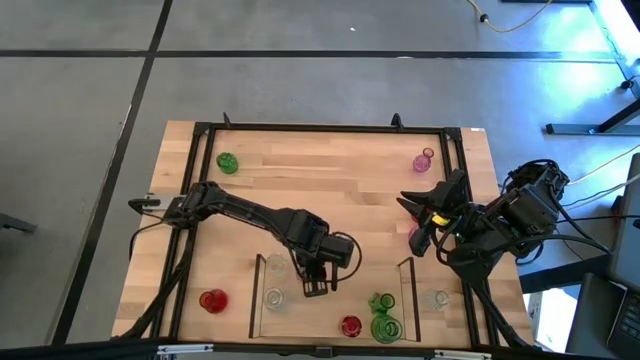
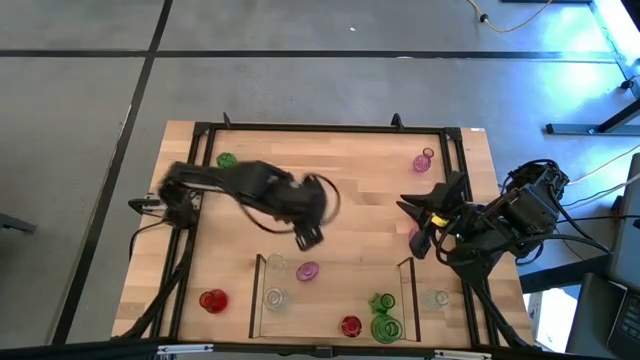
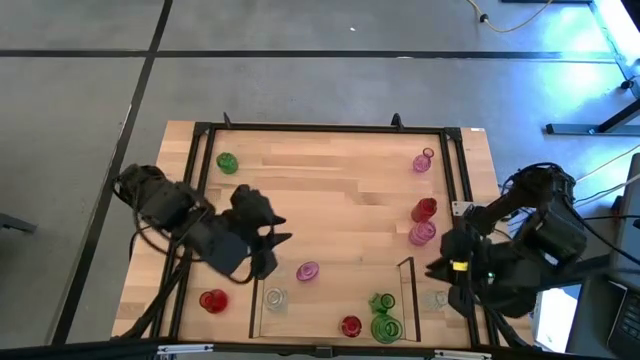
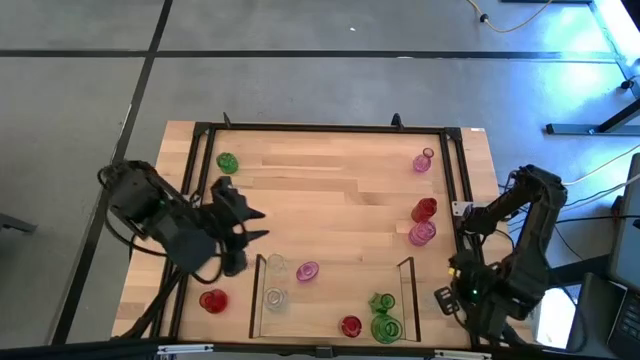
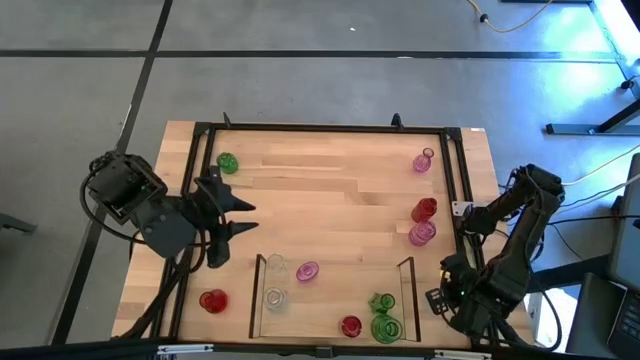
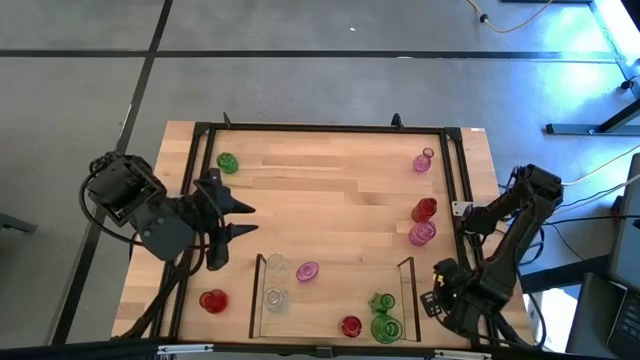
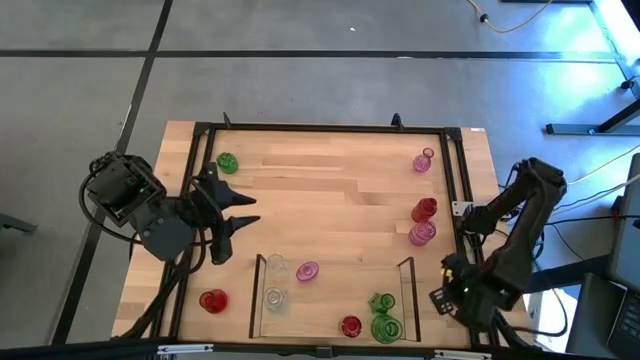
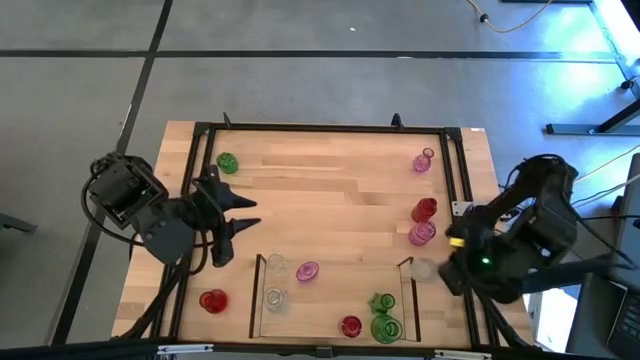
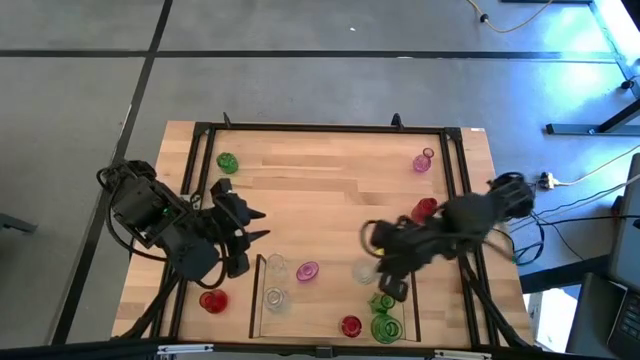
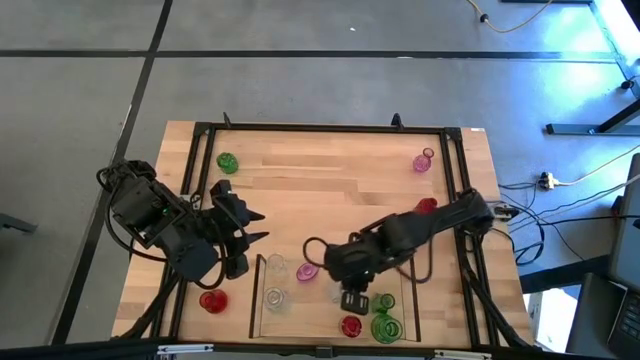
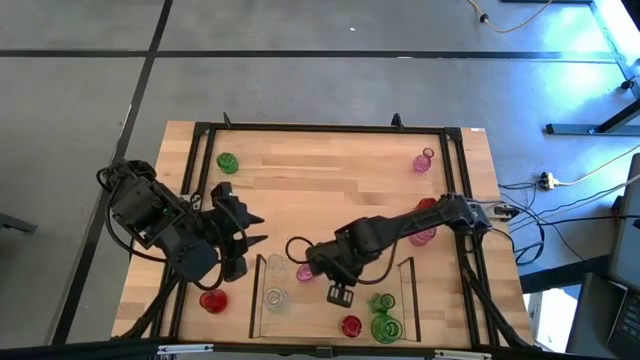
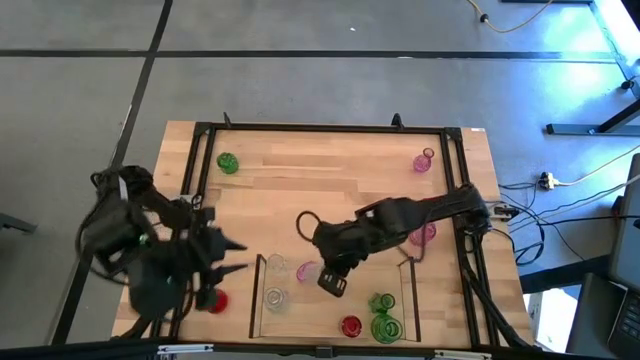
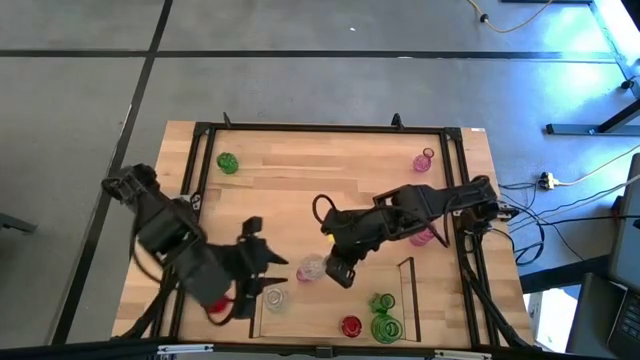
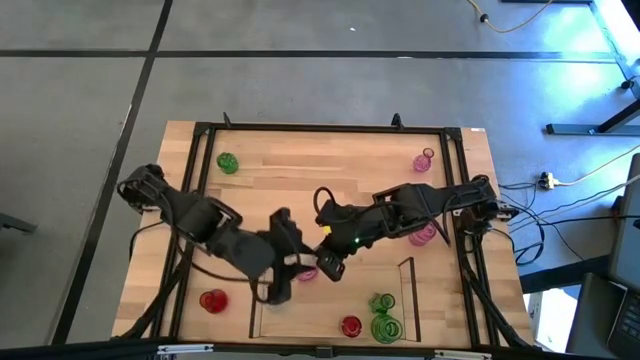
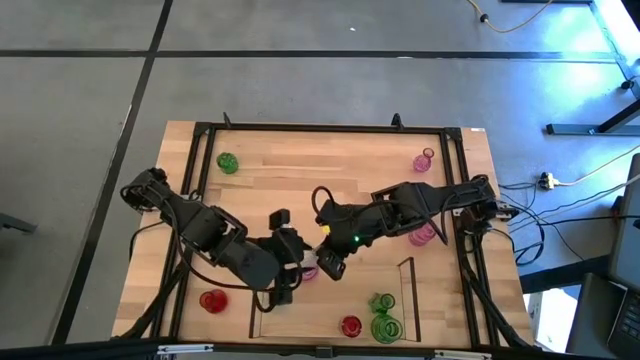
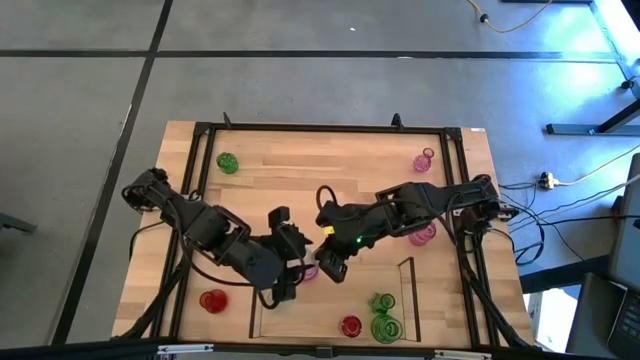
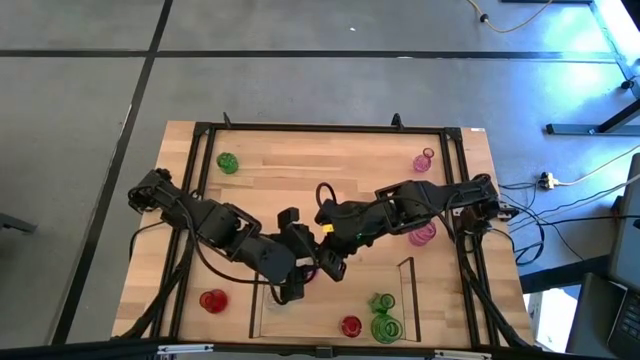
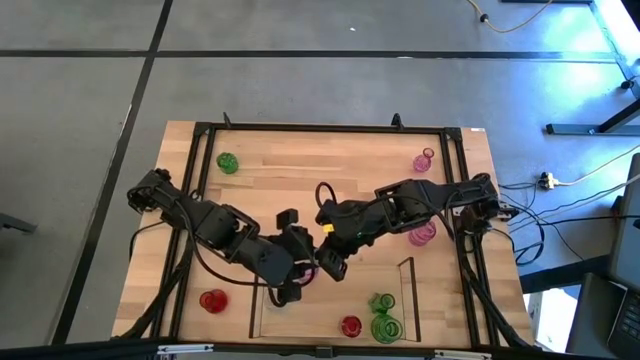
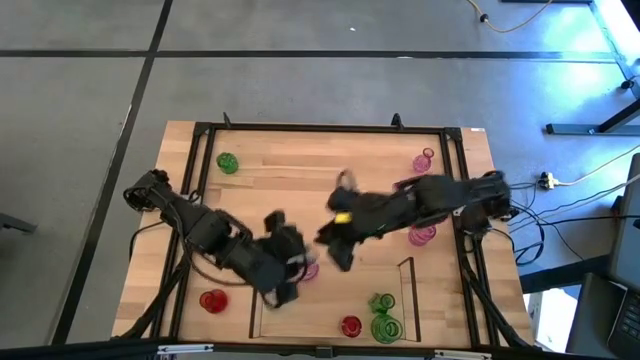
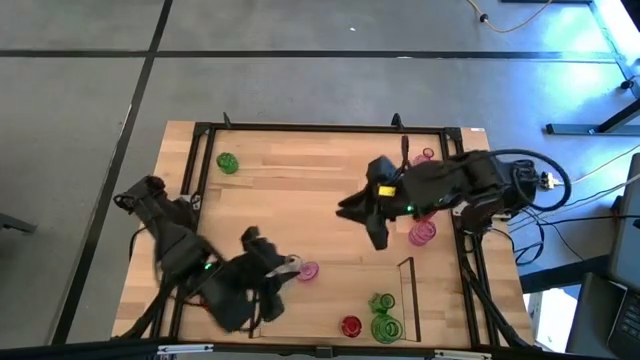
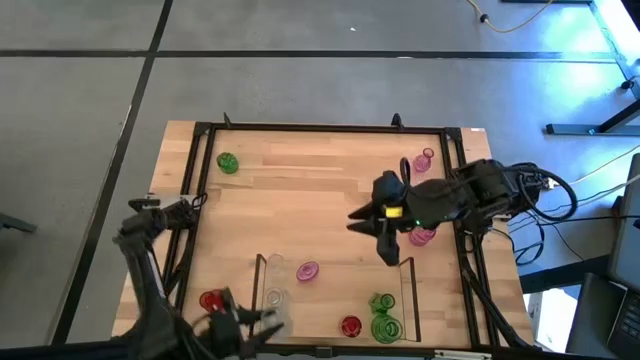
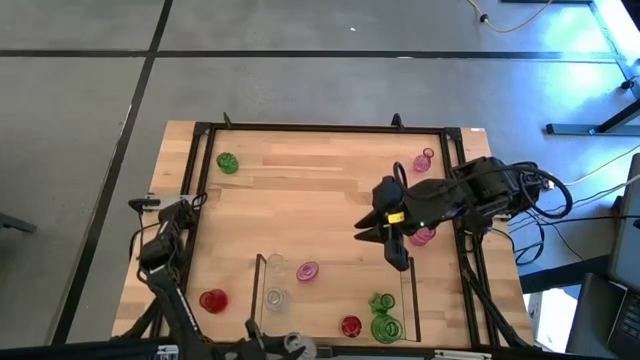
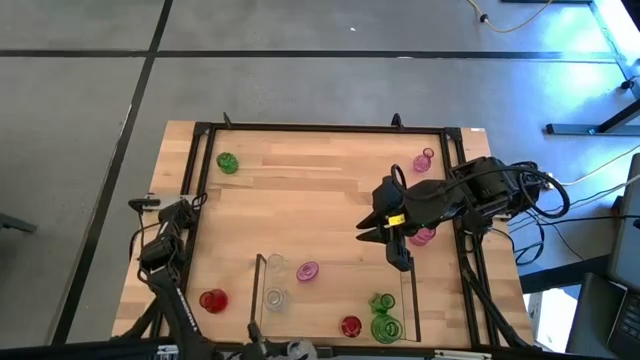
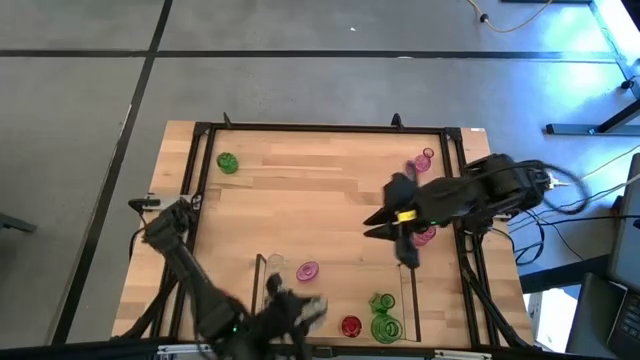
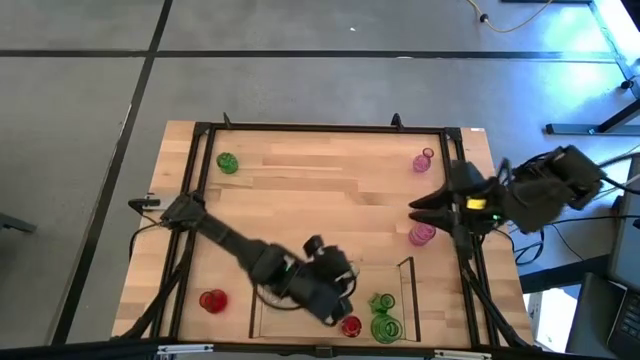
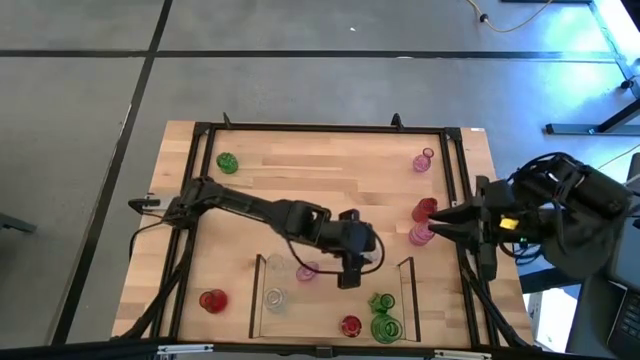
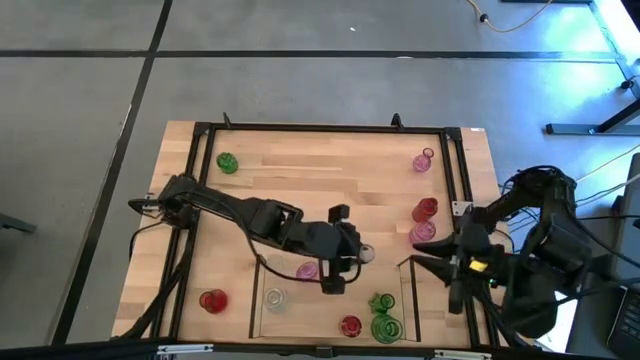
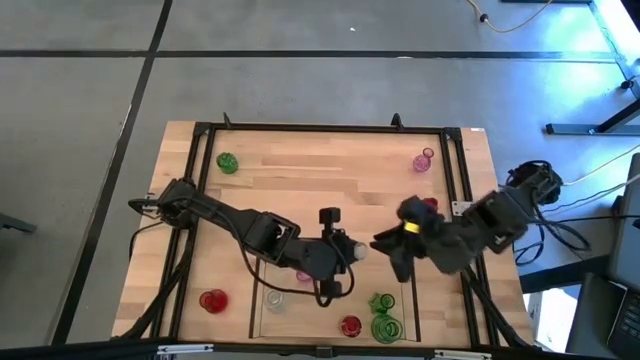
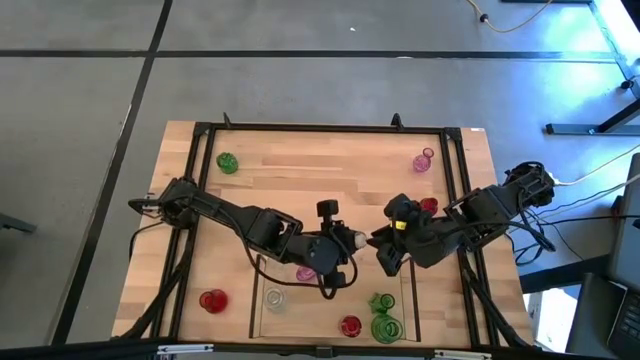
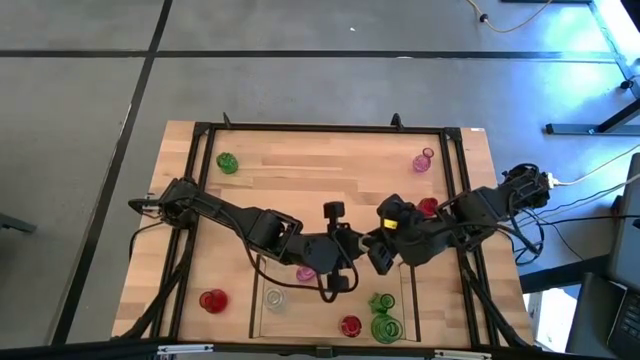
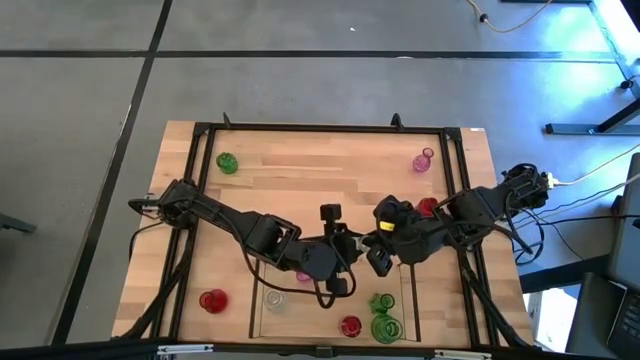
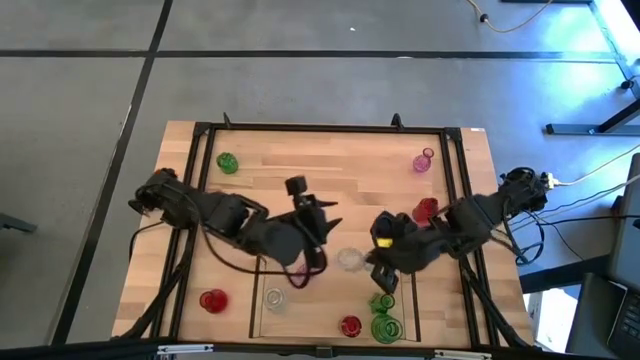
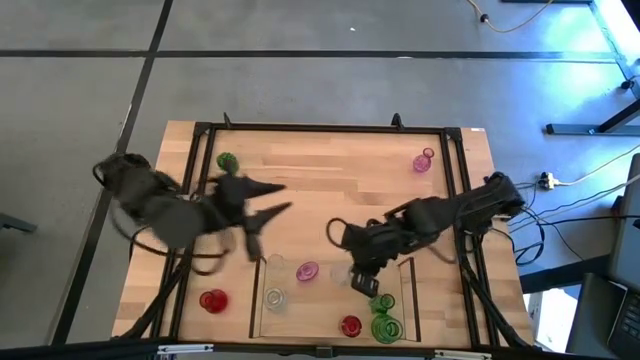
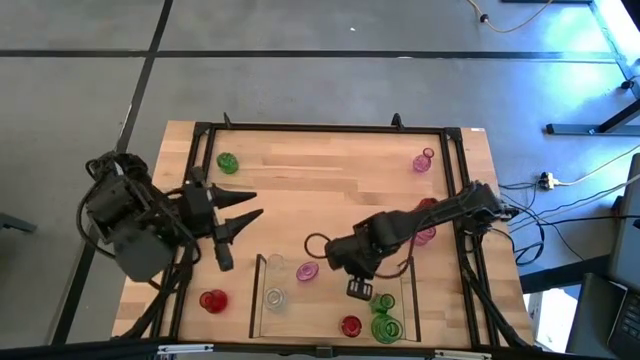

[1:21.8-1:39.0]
Task: sort vases onto shelf
Put the transparent vase aligned with the other transparent vases on the shelf

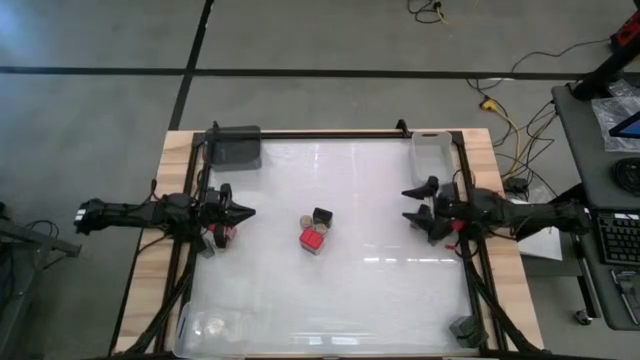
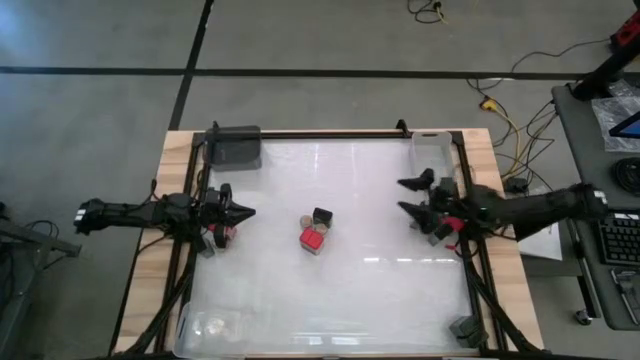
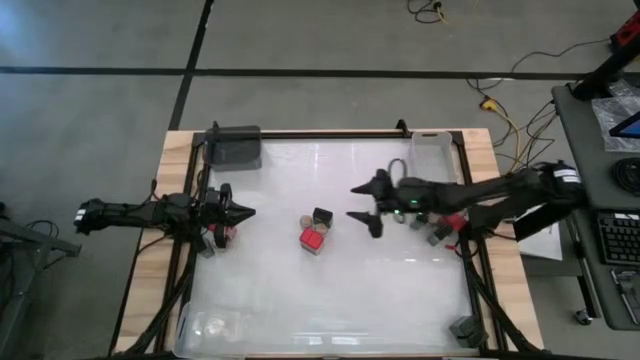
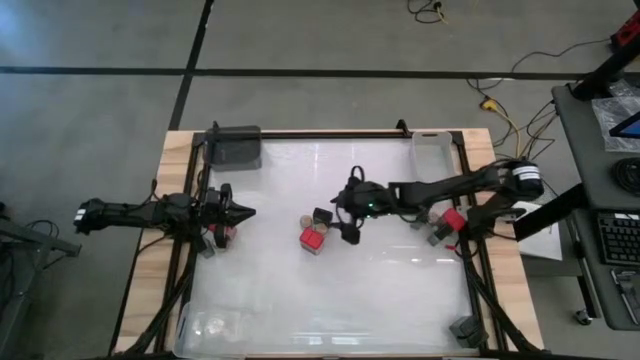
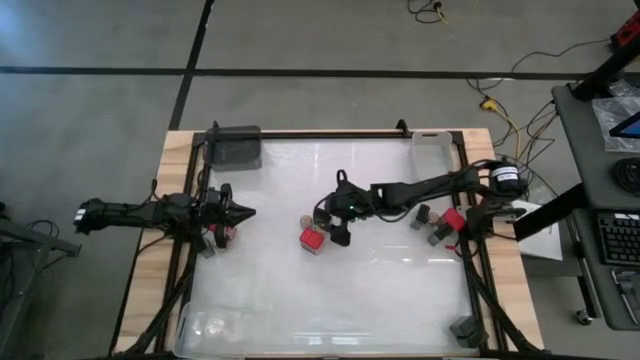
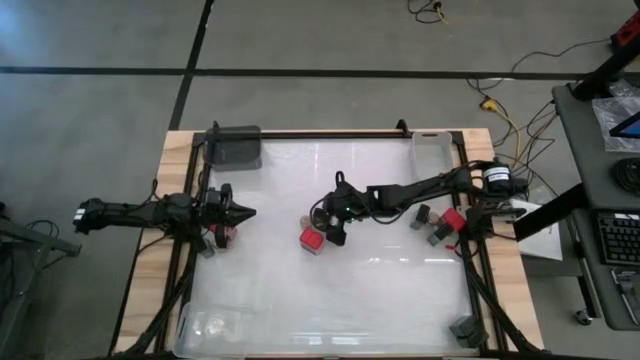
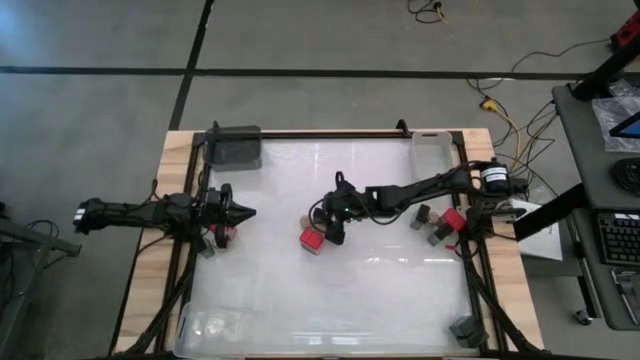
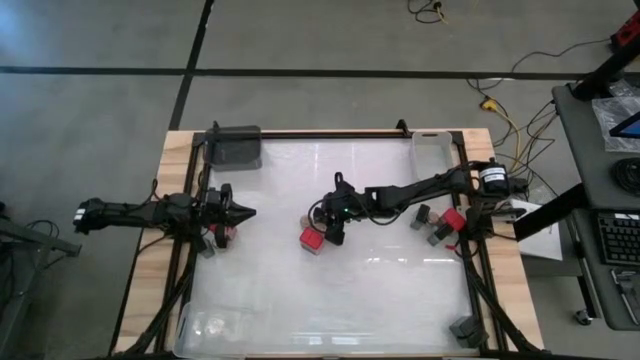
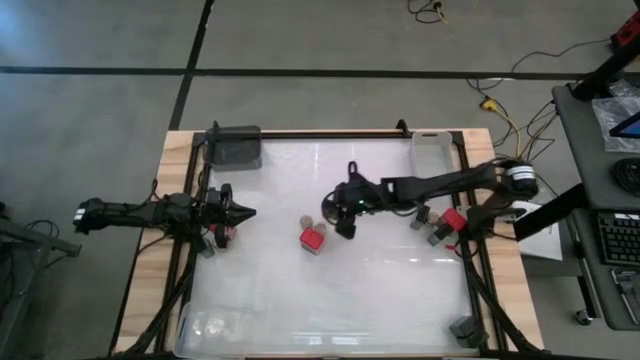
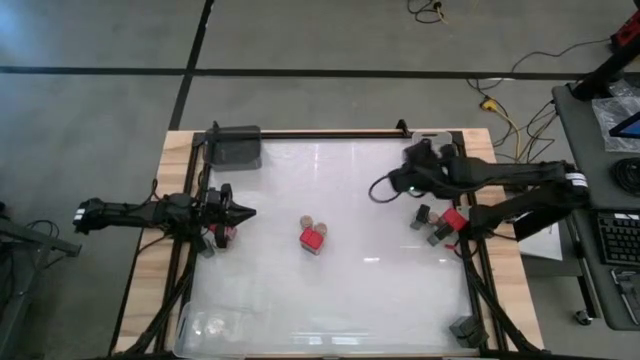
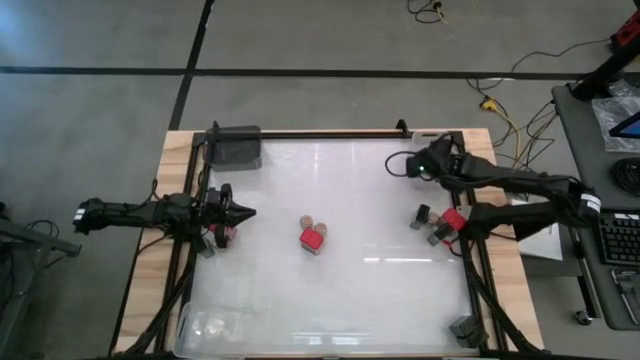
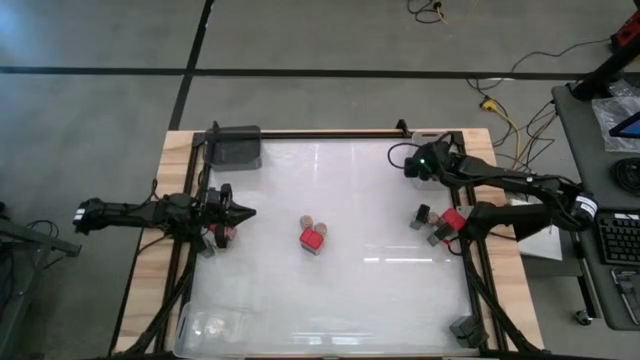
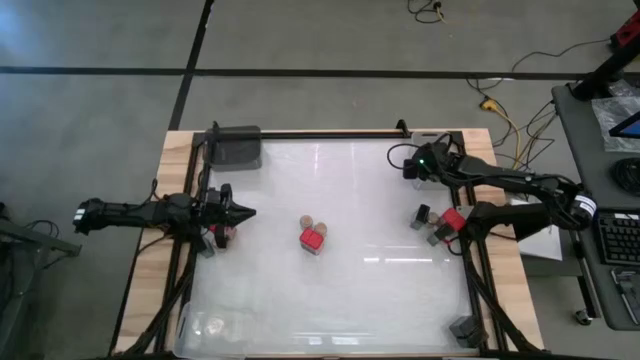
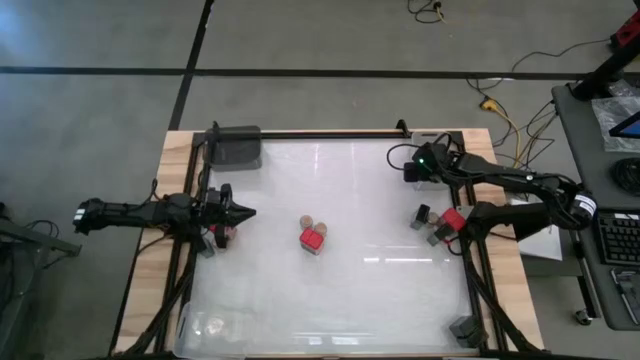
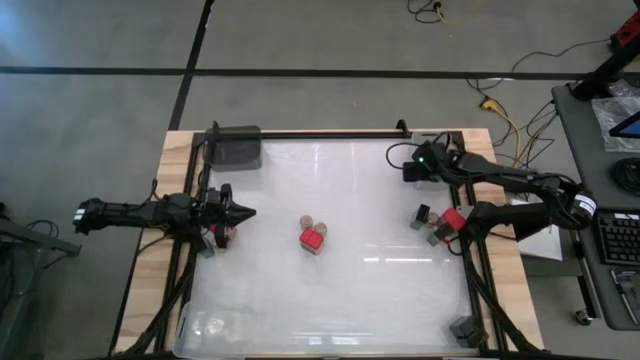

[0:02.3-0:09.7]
Task: Sort spices by type
Put the black seasoning can into the gray bin
